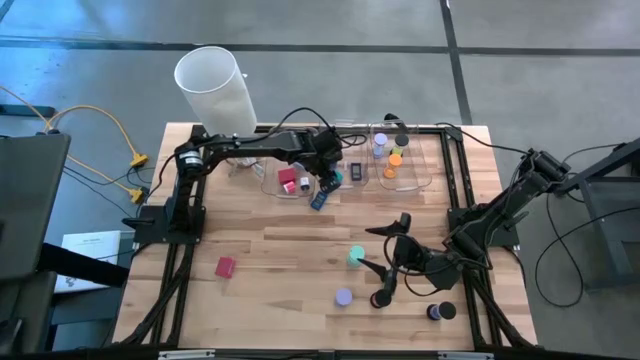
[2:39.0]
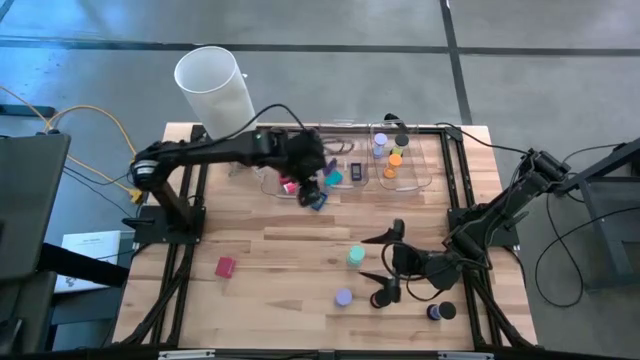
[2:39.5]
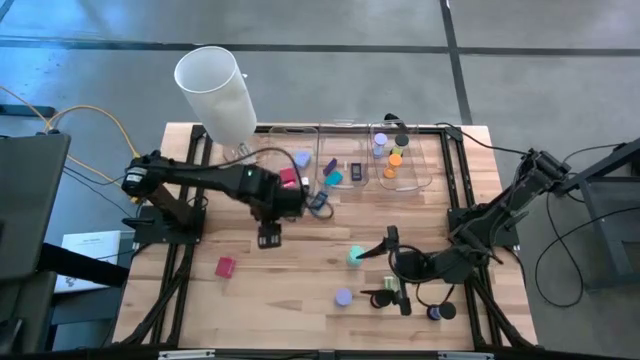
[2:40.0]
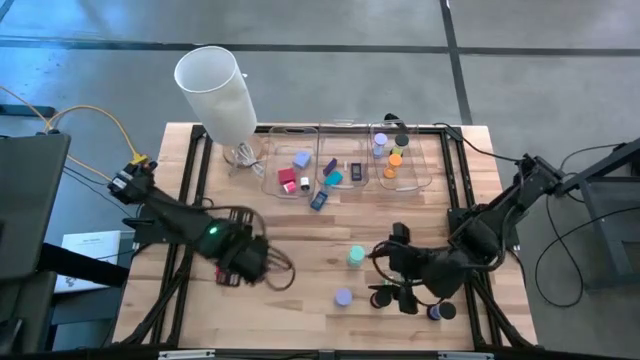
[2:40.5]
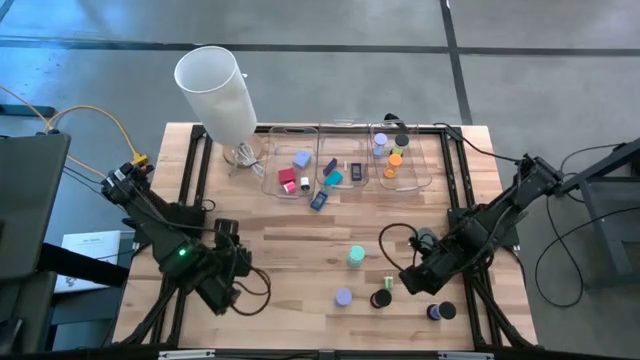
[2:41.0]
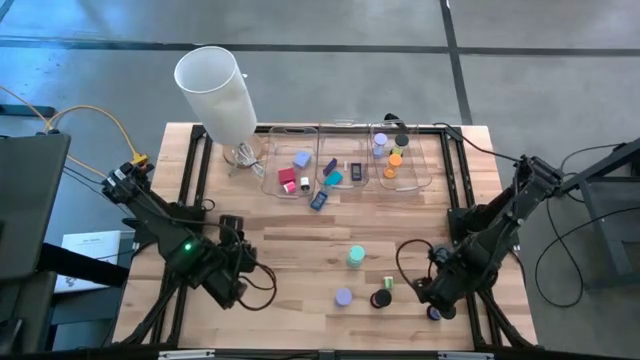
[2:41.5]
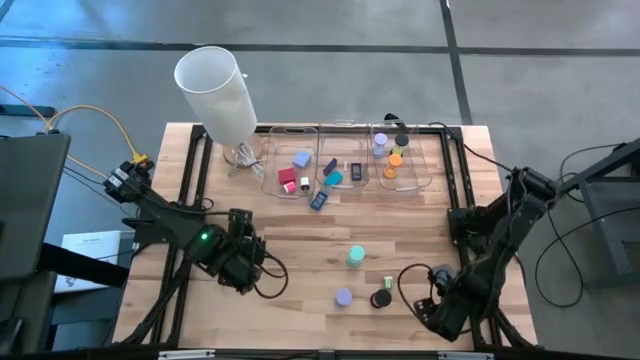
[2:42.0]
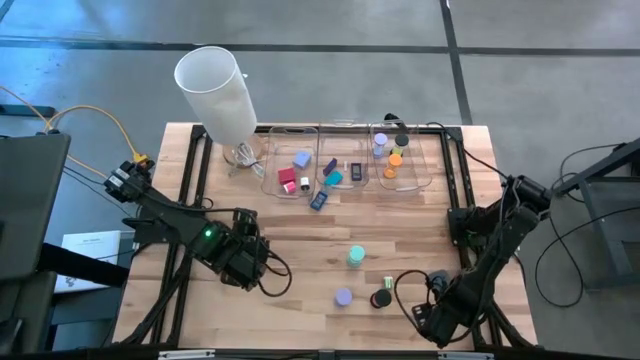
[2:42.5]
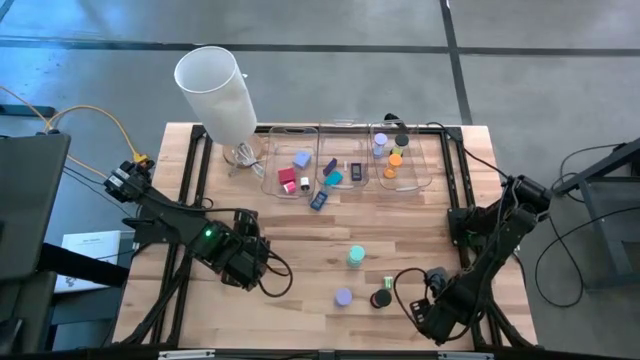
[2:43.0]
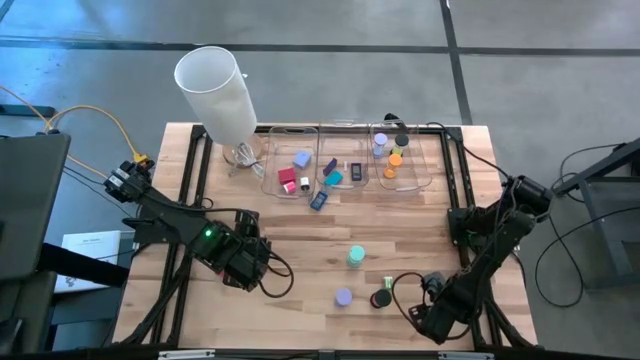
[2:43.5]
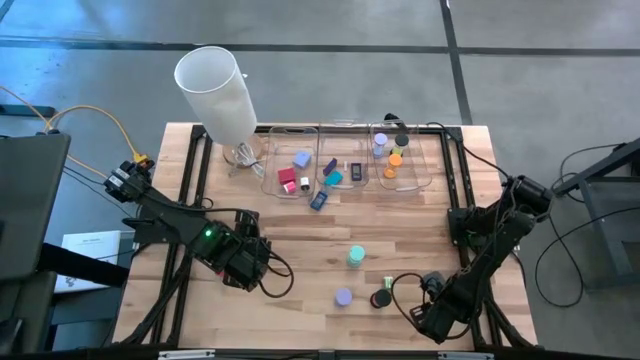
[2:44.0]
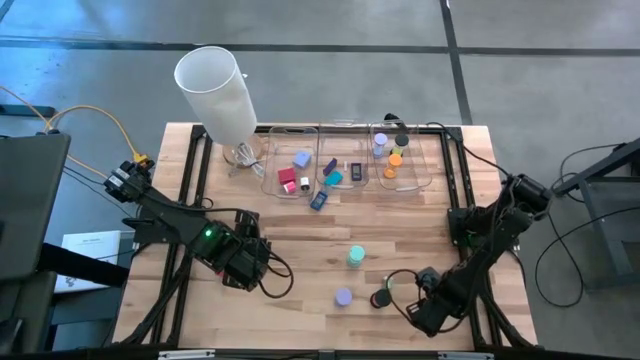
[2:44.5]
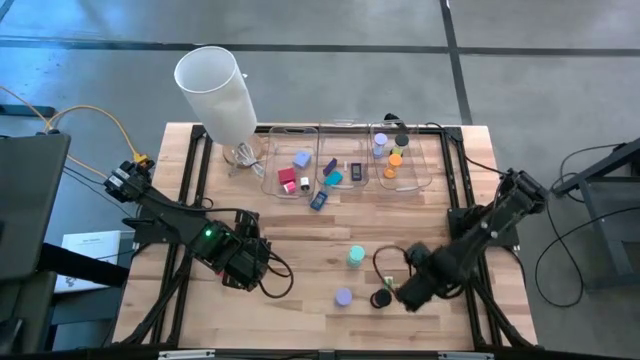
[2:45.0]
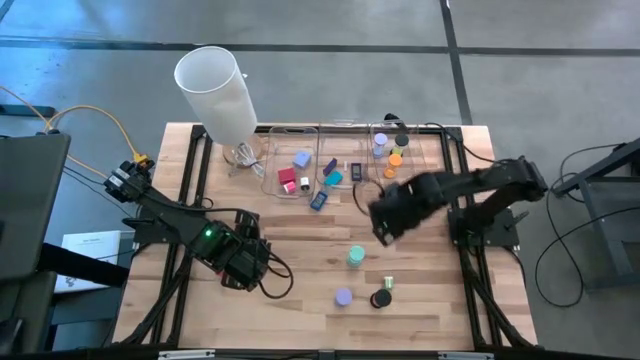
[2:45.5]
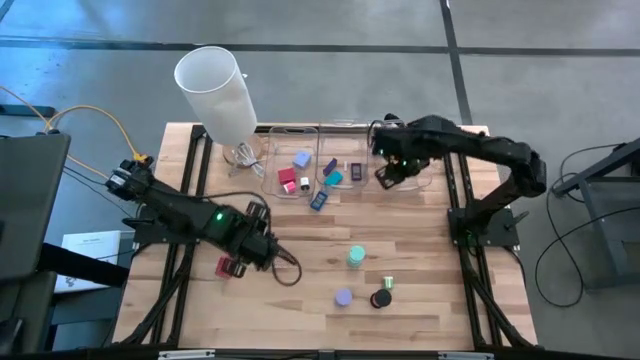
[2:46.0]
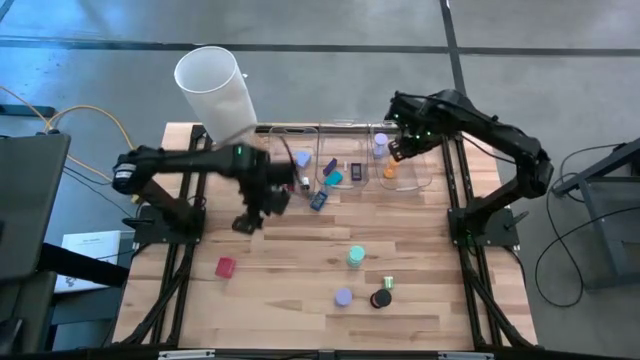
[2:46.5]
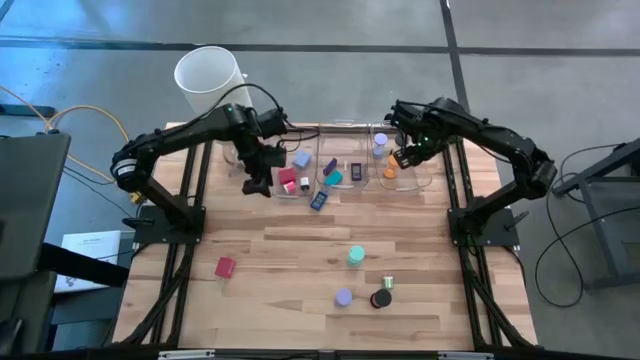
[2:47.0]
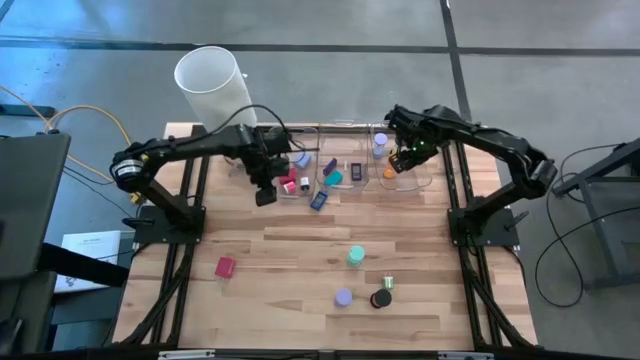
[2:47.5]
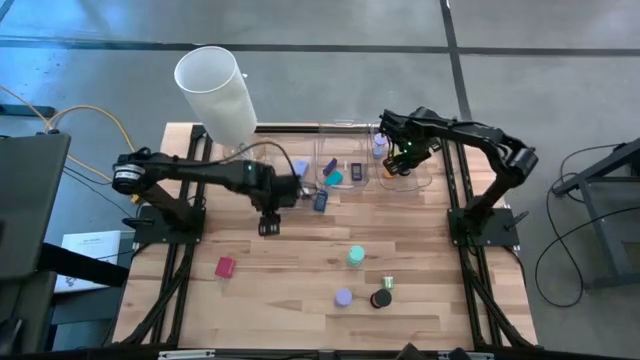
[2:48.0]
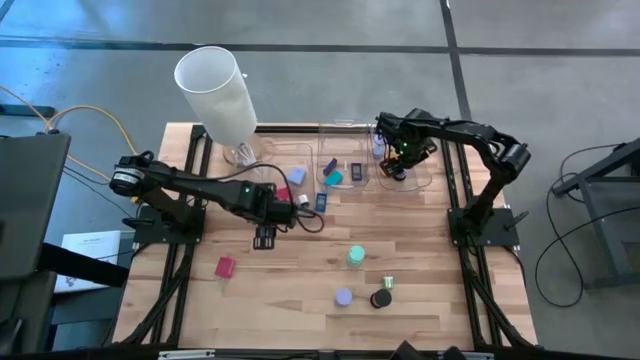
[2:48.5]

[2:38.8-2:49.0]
Task: Pick & Place Office items
Put the blue hourglass into the right transparent bin

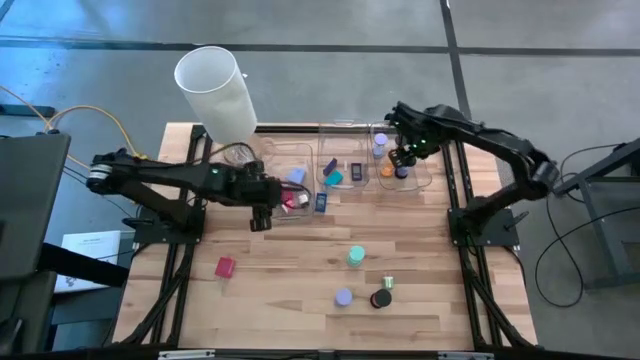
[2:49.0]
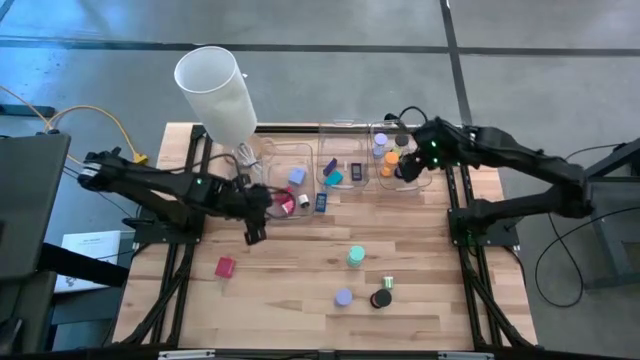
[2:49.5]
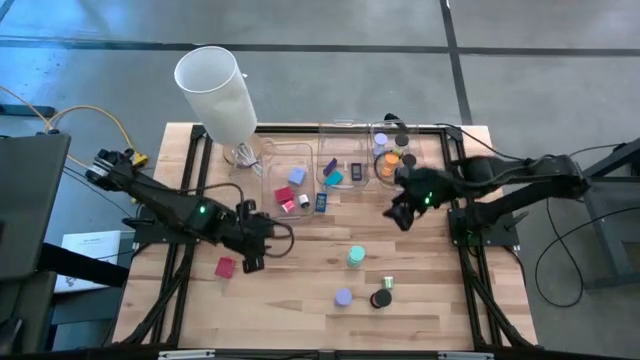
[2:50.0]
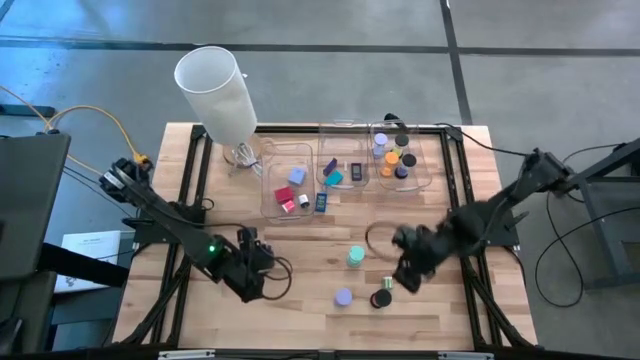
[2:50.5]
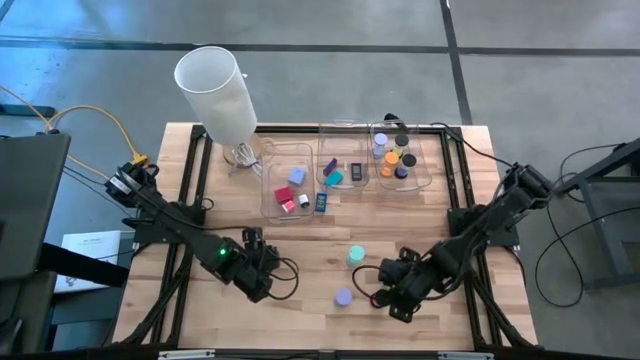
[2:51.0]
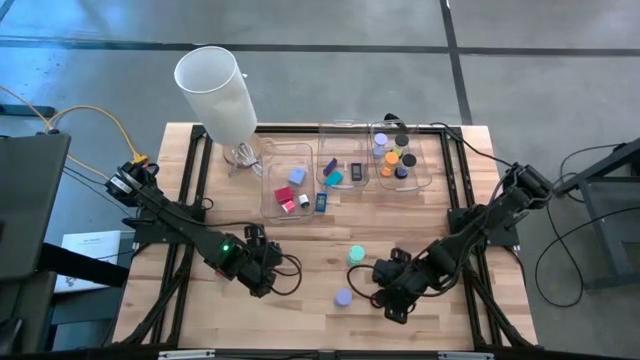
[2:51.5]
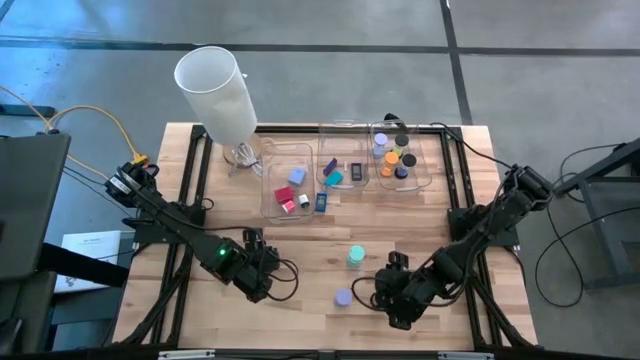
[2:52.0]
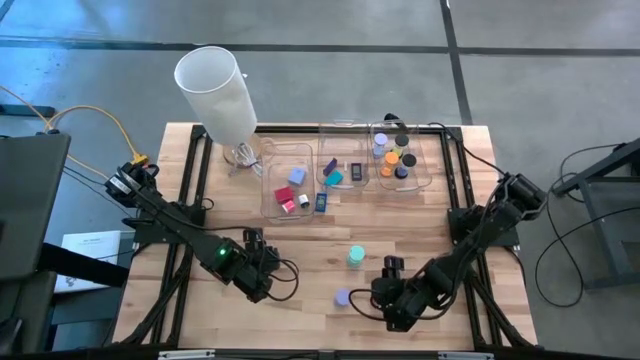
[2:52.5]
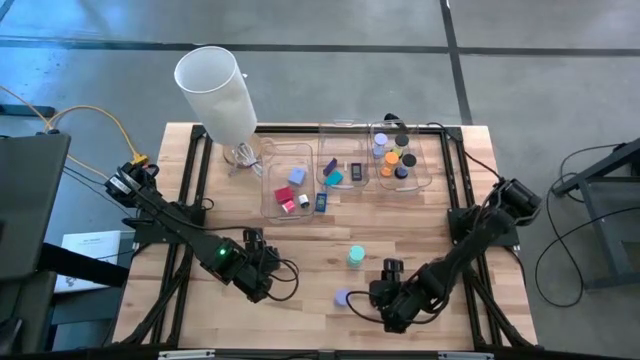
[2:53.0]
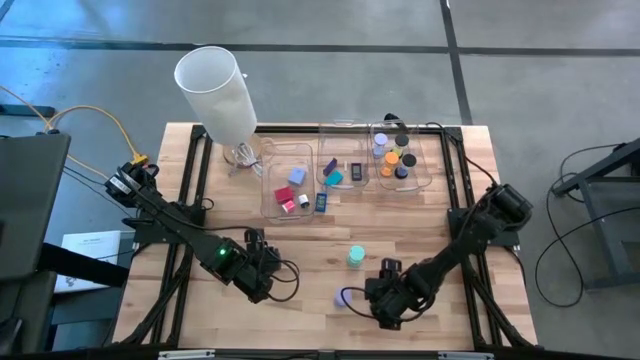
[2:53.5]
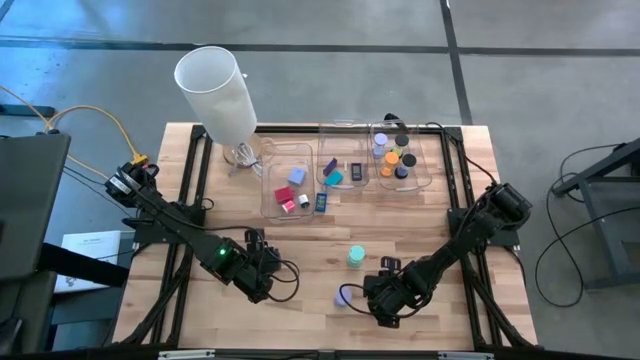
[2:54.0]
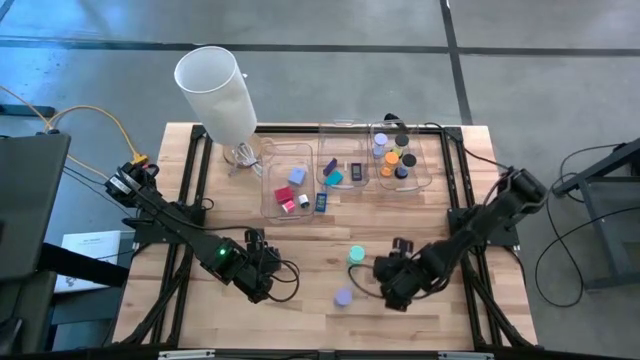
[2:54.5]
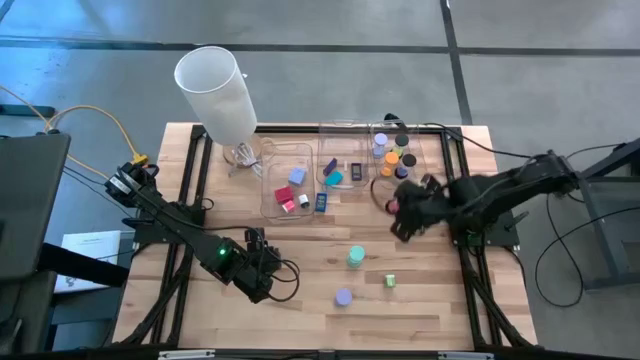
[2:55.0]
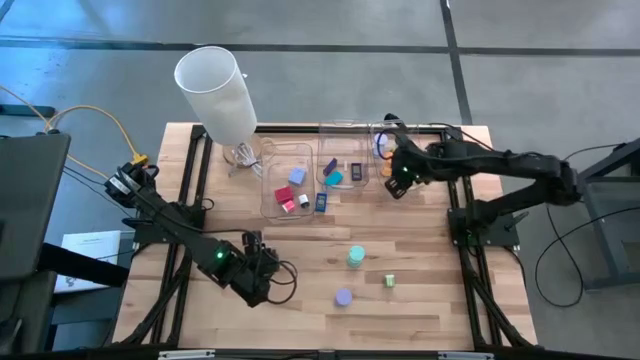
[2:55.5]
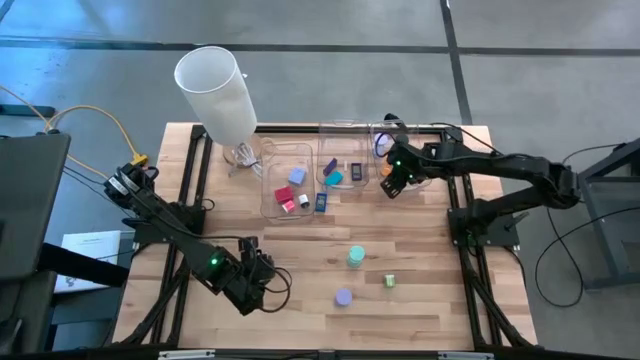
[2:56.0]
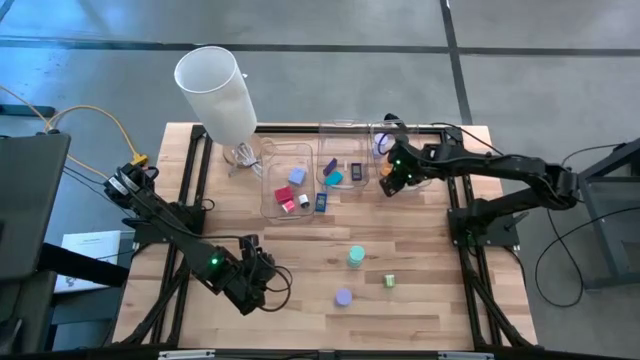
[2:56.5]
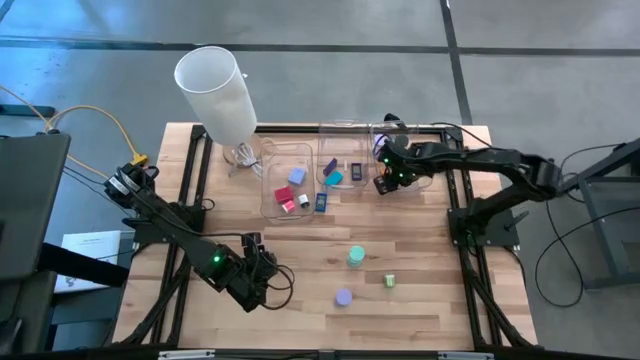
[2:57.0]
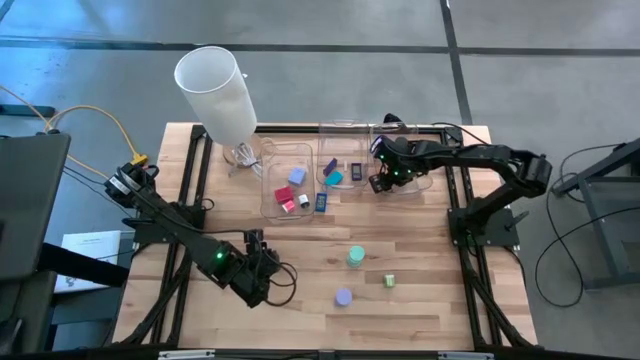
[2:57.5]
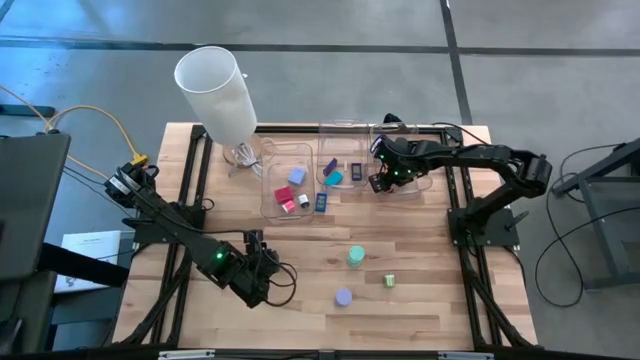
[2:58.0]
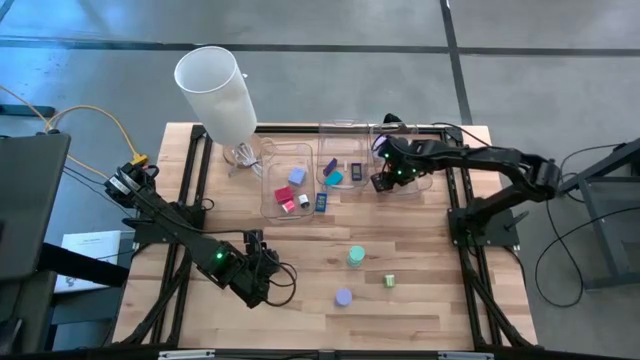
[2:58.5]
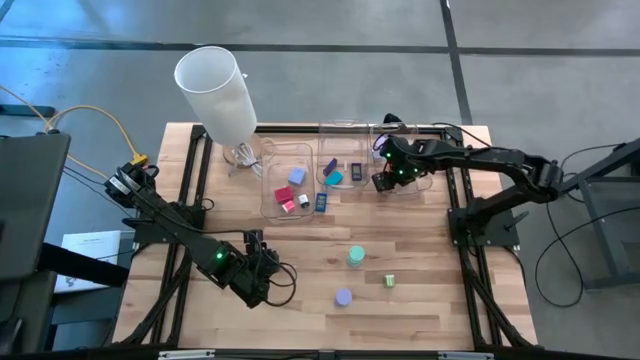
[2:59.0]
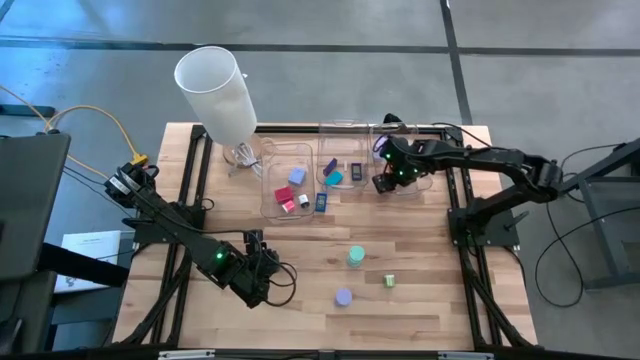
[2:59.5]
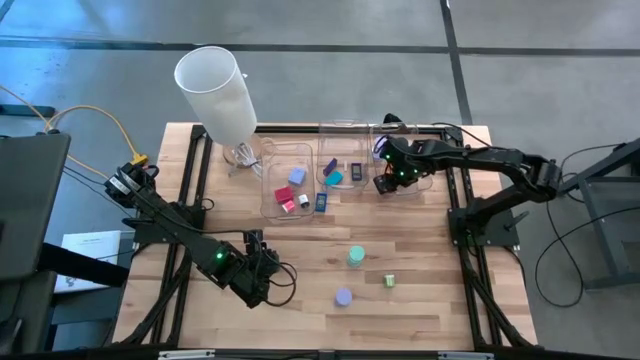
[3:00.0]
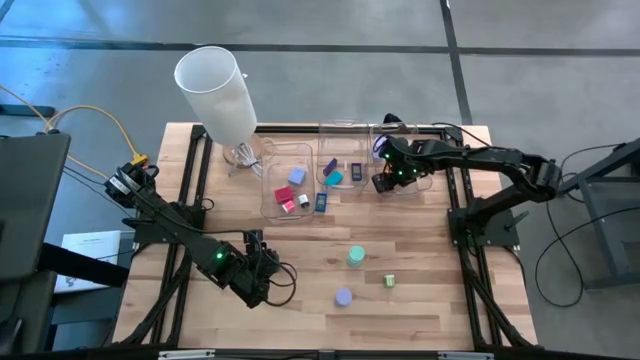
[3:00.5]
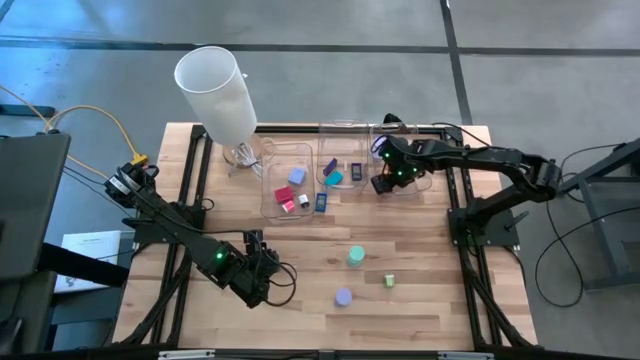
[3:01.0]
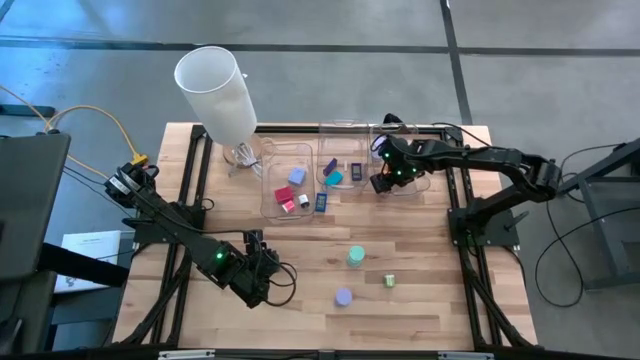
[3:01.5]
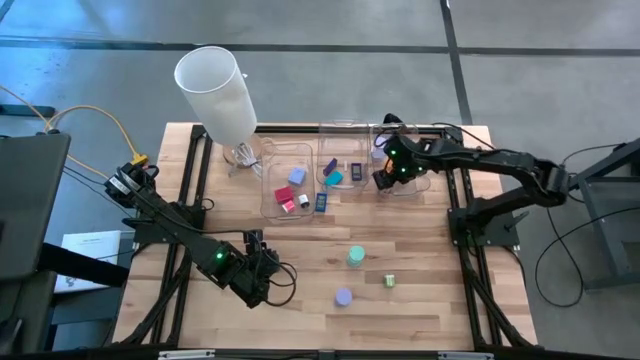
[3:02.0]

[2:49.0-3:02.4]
Put the pink hourglass into the right transparent bin
